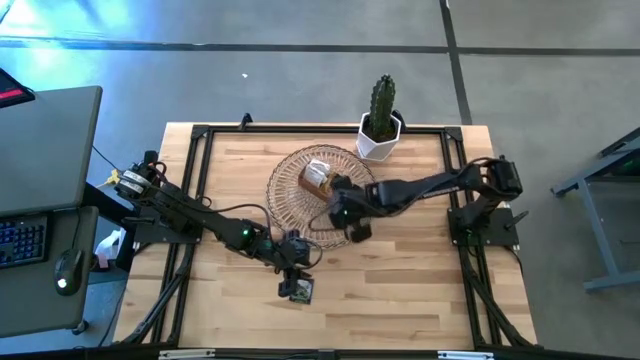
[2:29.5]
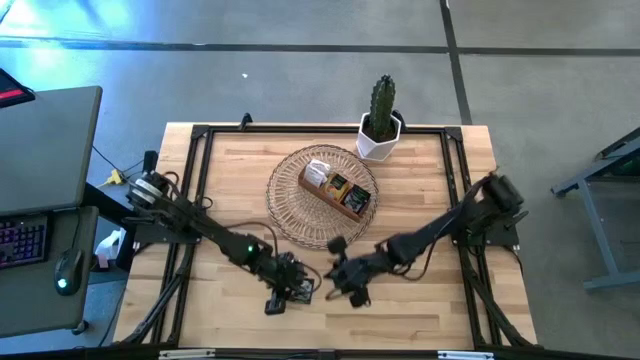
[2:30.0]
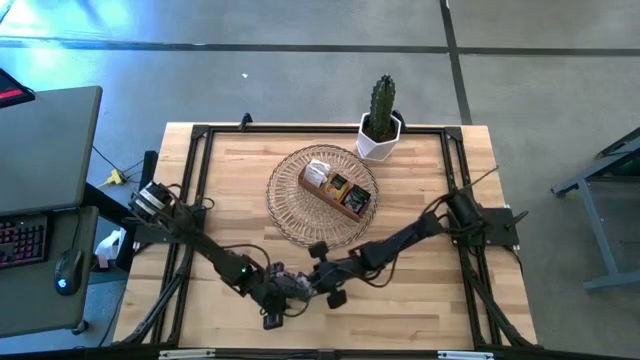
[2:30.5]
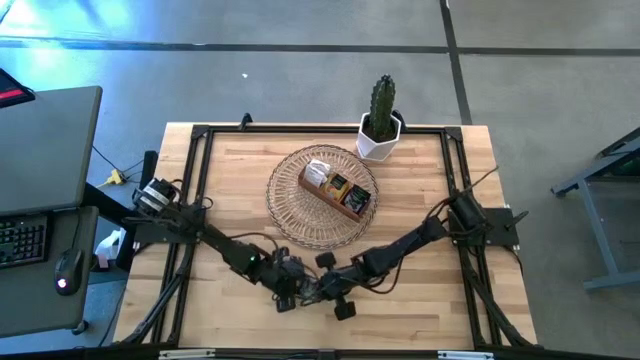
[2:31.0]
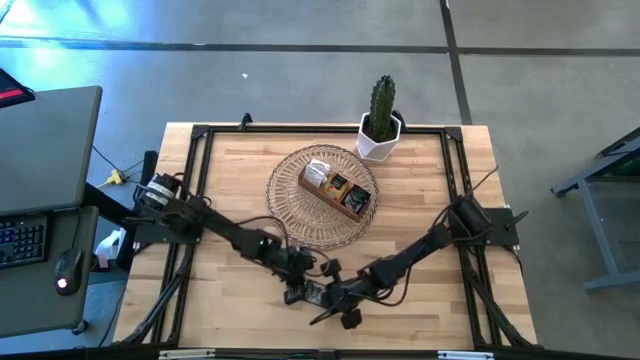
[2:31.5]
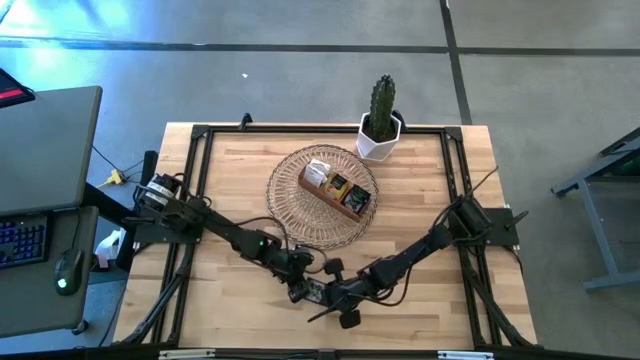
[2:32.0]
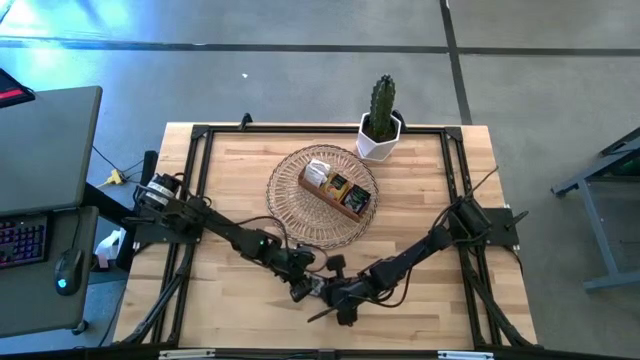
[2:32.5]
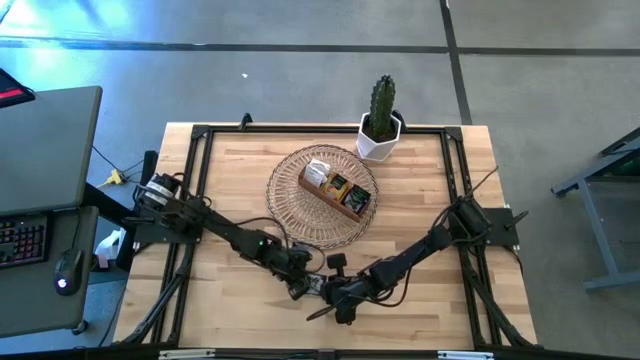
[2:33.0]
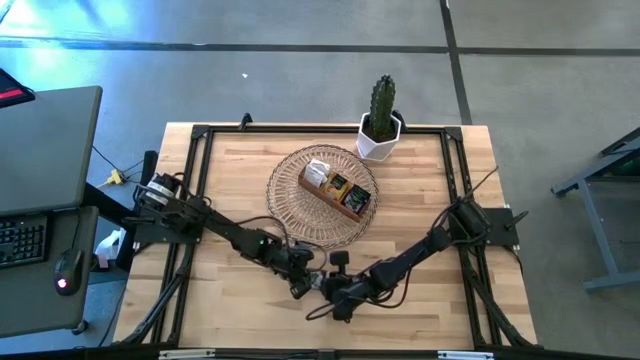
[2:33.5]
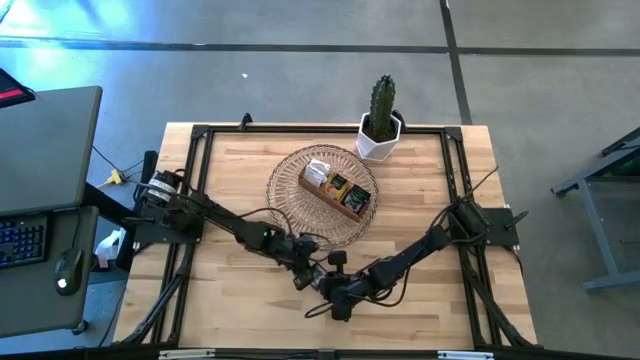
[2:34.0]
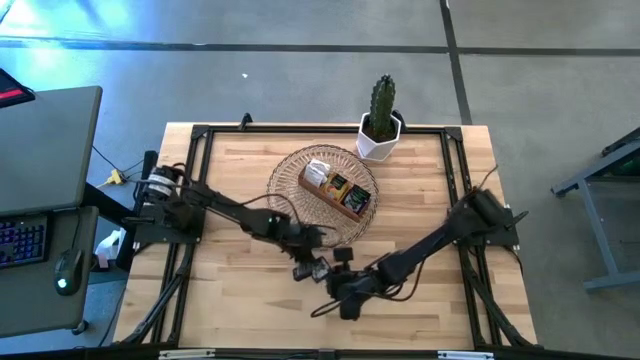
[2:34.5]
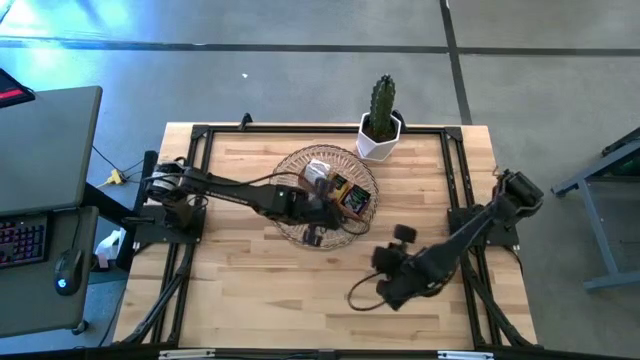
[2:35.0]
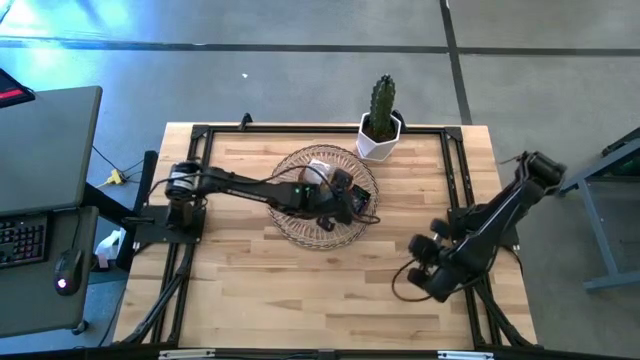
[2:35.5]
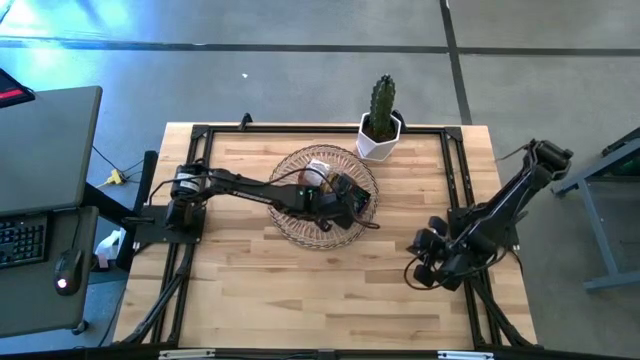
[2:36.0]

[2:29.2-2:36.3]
Task: Pick & Place Tea
Put the purple tea pack into the right section of the wooden organizer

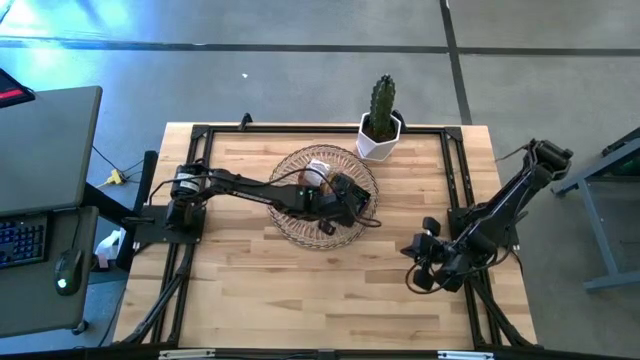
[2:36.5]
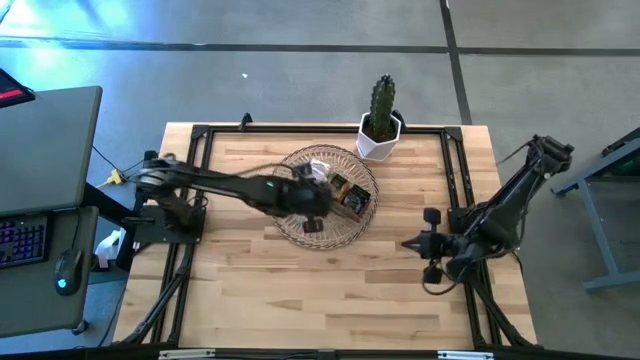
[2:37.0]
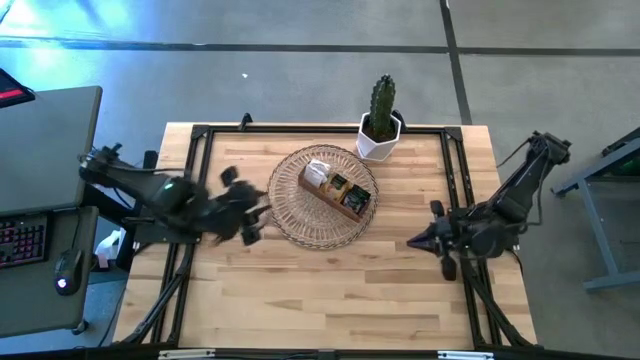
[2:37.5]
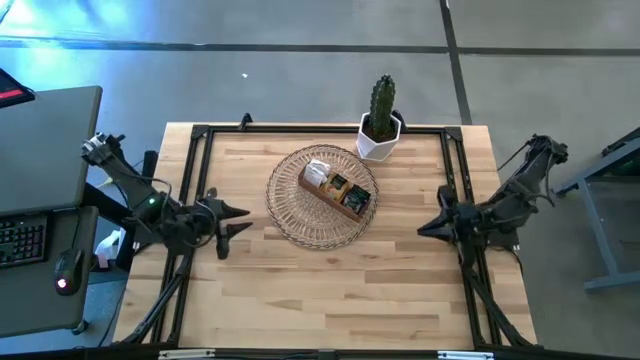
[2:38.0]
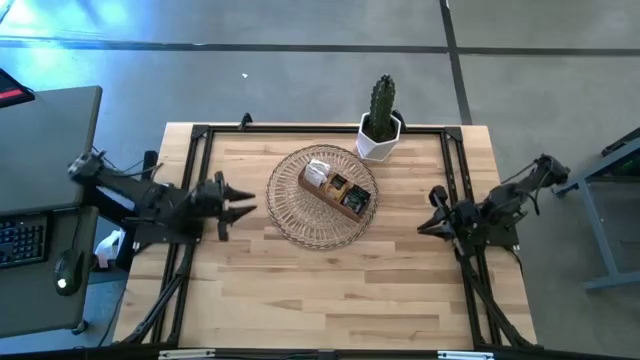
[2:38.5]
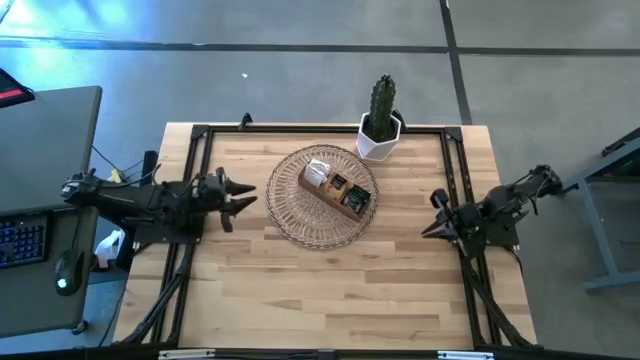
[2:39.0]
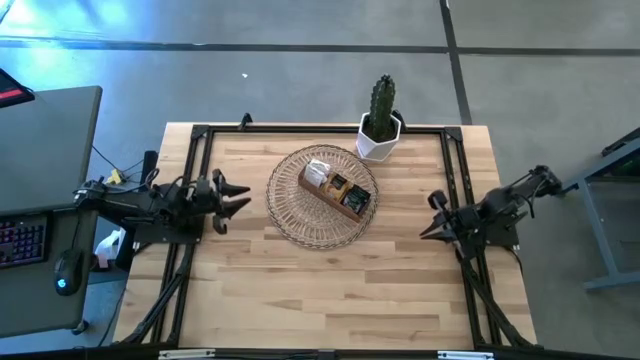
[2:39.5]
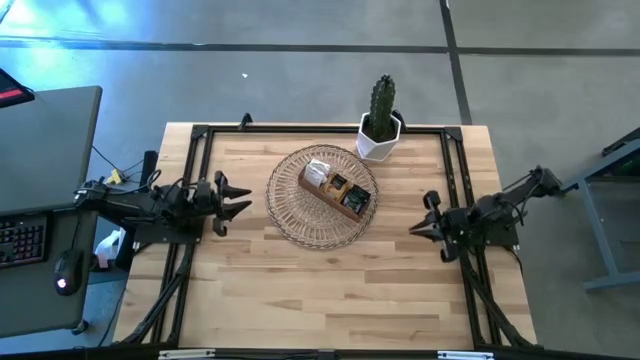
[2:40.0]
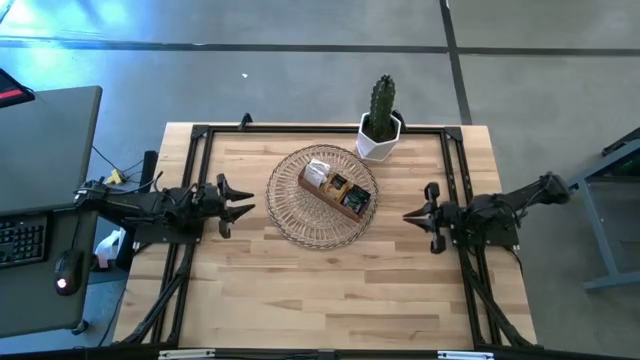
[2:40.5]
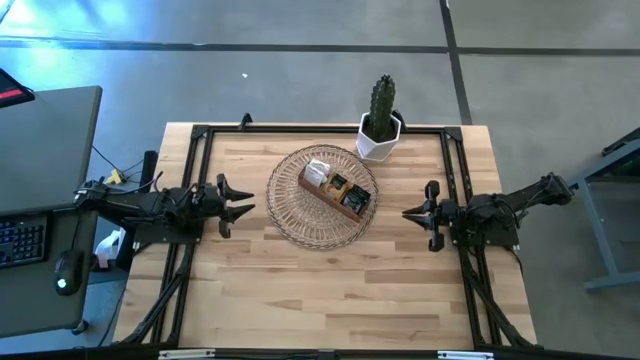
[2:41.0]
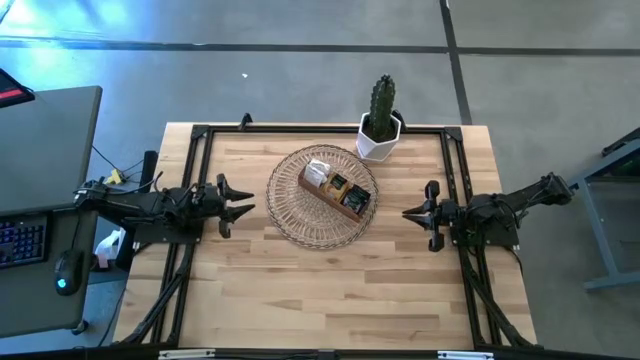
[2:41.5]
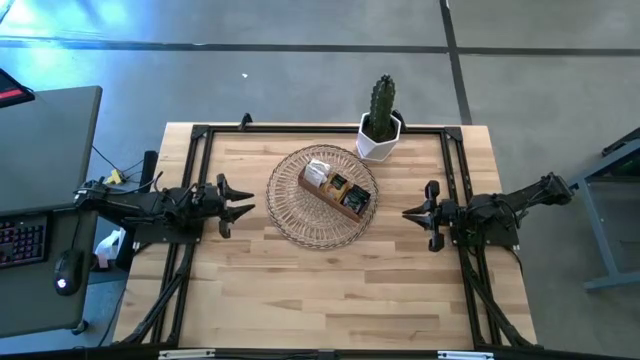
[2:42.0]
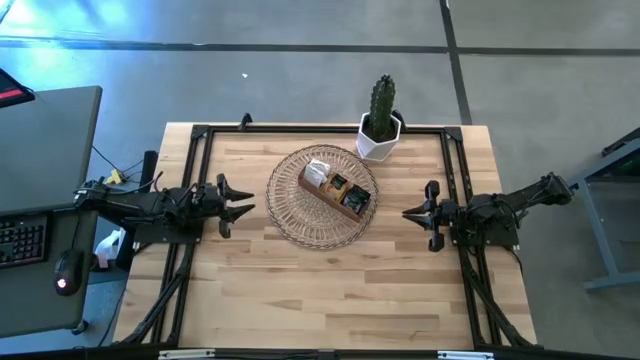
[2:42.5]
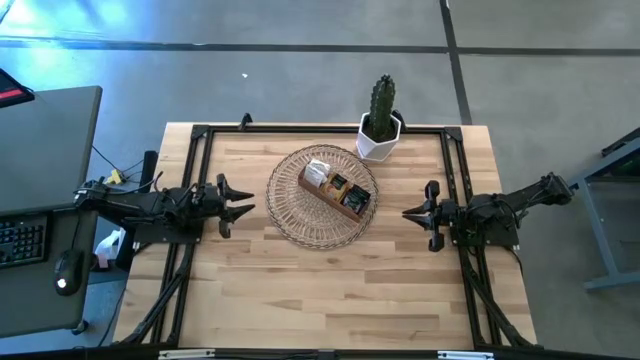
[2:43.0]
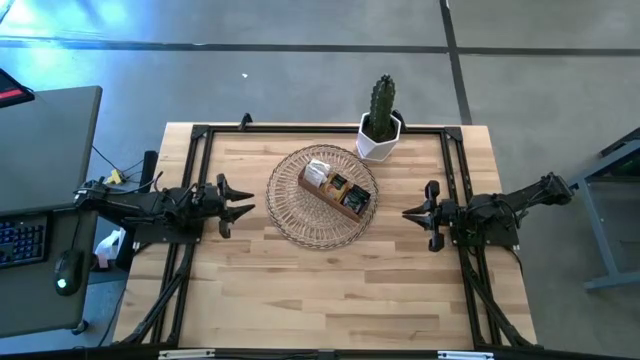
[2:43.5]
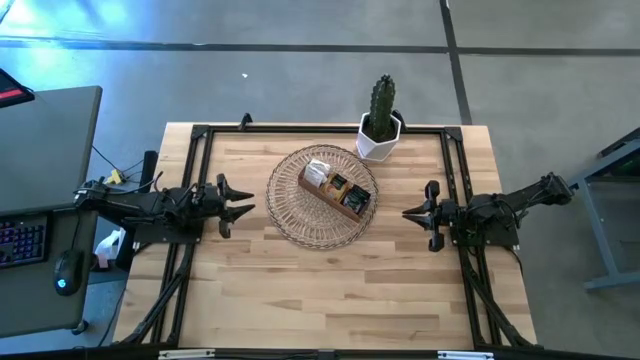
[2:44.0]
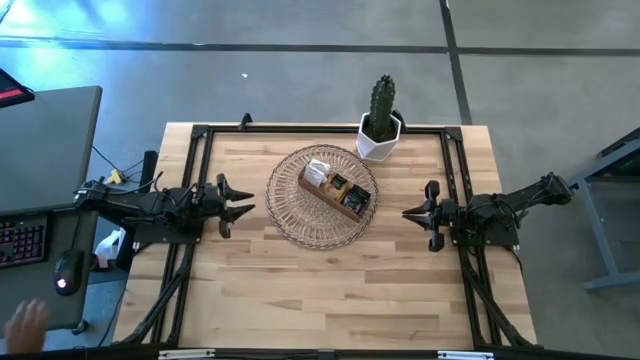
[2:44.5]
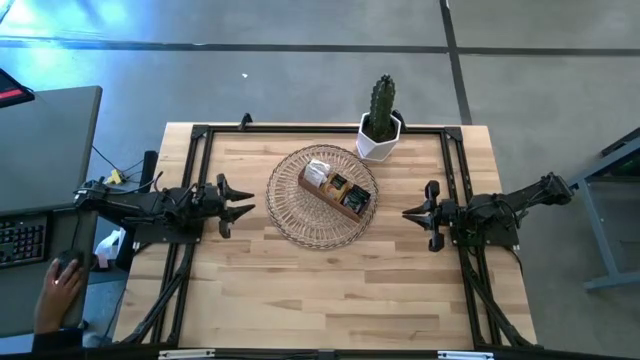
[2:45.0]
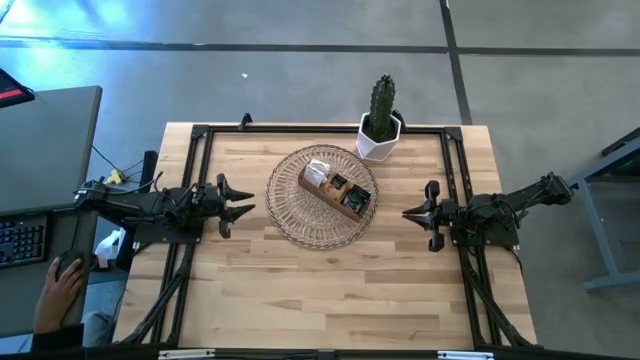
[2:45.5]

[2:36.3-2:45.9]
Return to Home Position
